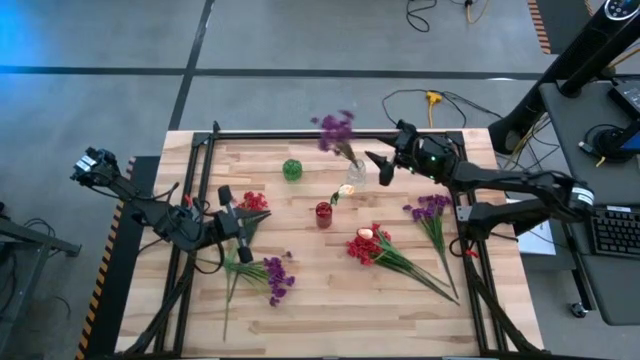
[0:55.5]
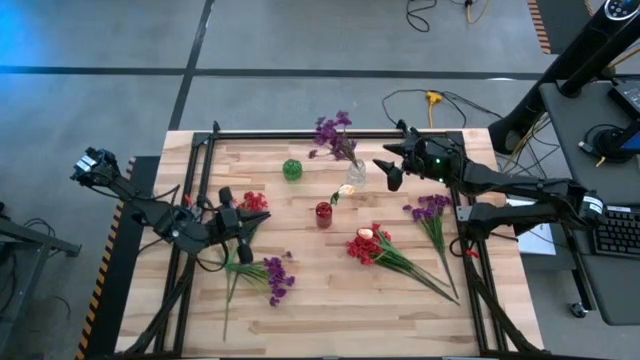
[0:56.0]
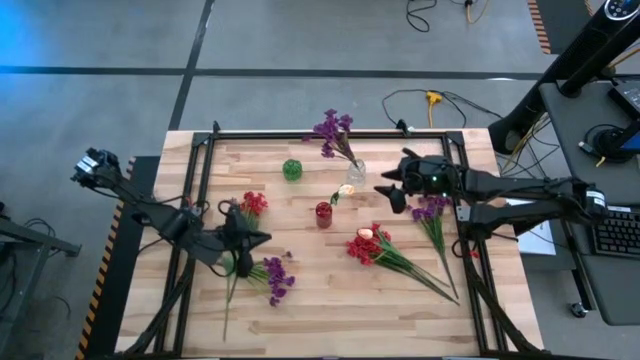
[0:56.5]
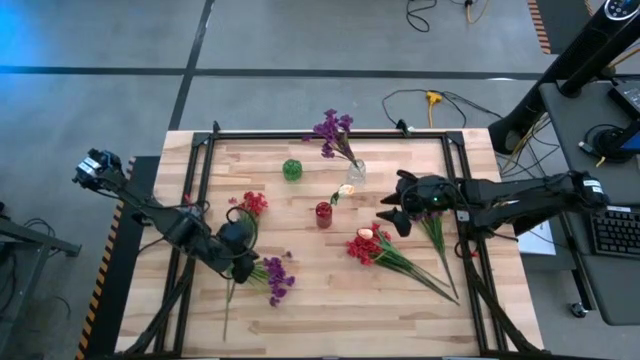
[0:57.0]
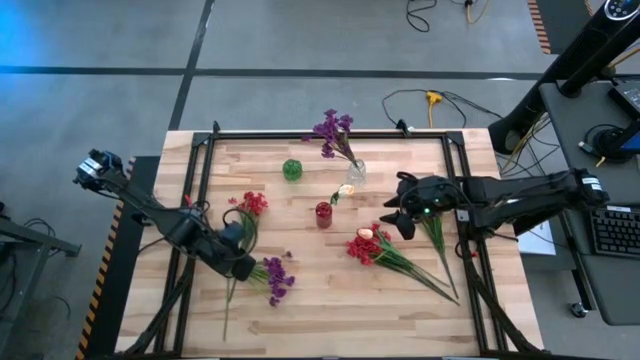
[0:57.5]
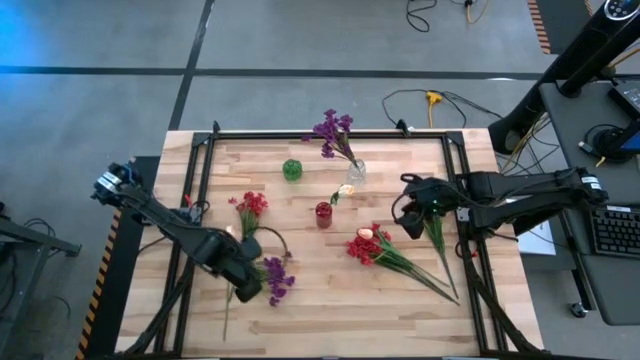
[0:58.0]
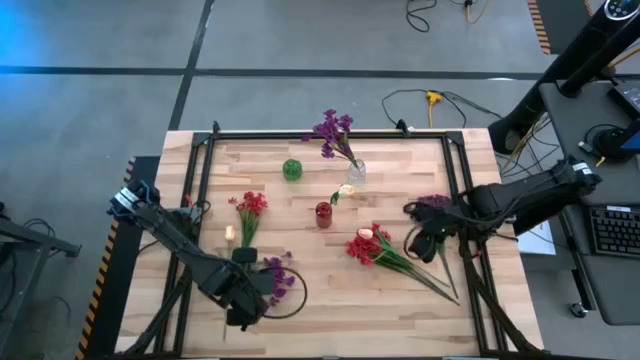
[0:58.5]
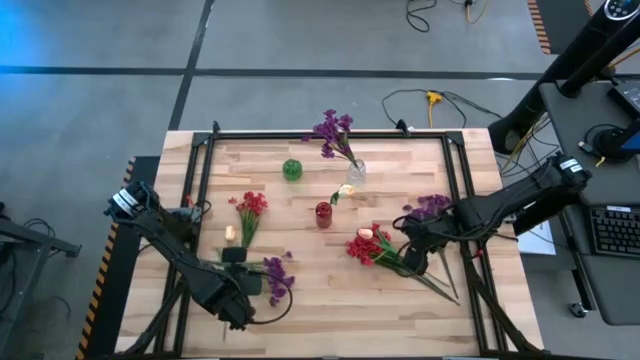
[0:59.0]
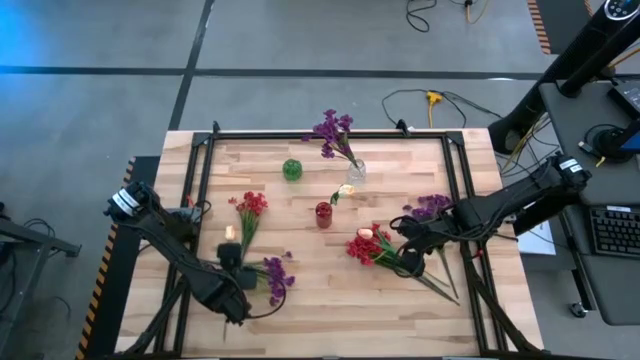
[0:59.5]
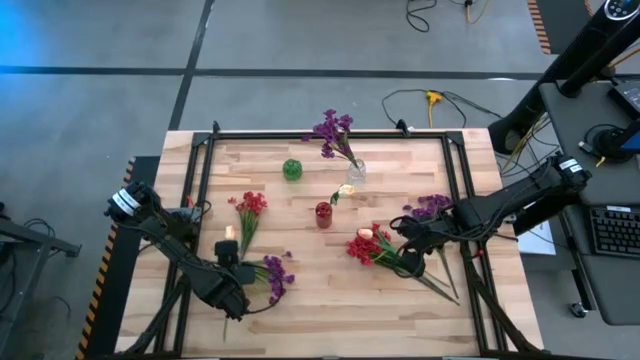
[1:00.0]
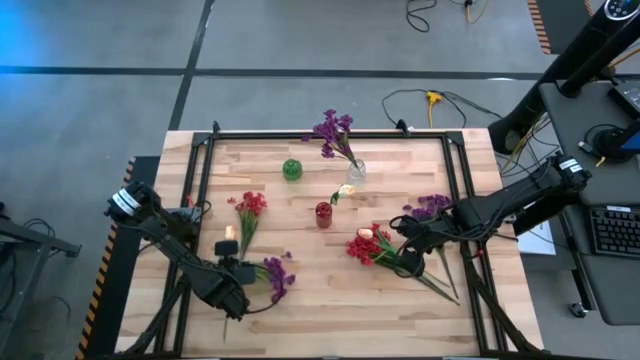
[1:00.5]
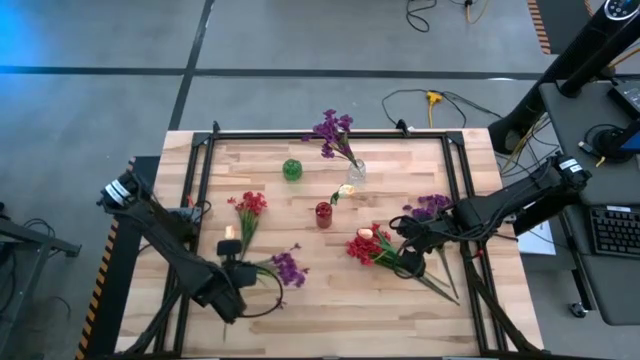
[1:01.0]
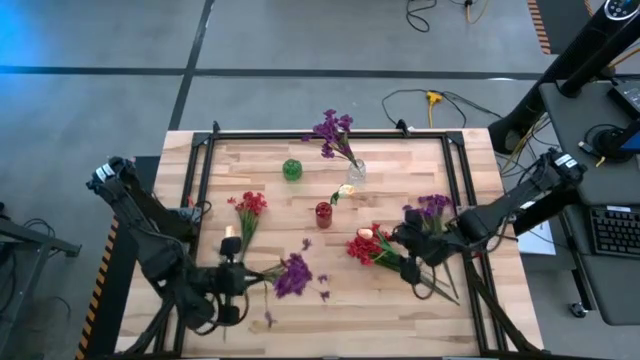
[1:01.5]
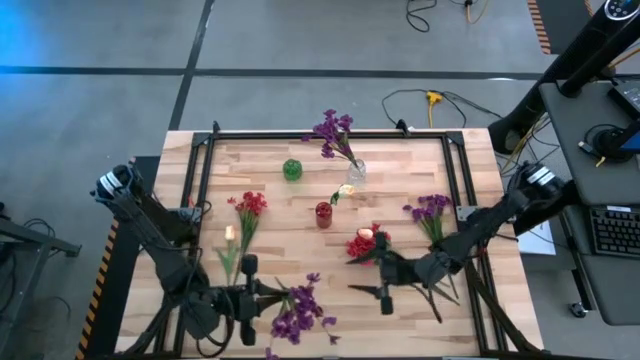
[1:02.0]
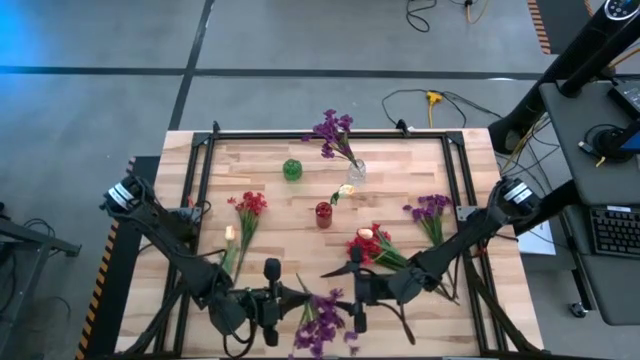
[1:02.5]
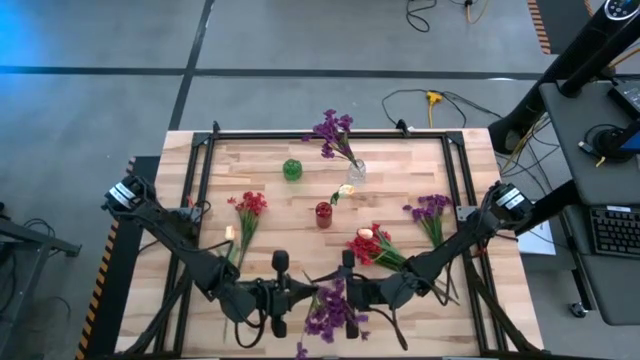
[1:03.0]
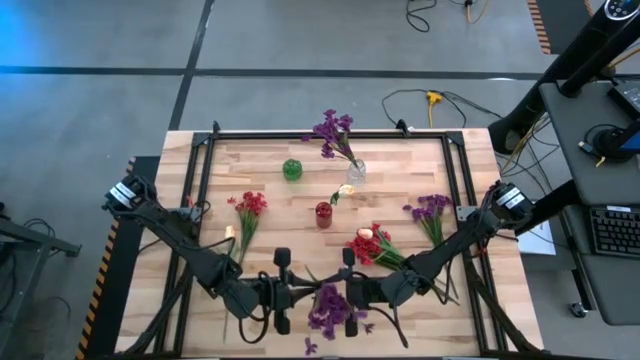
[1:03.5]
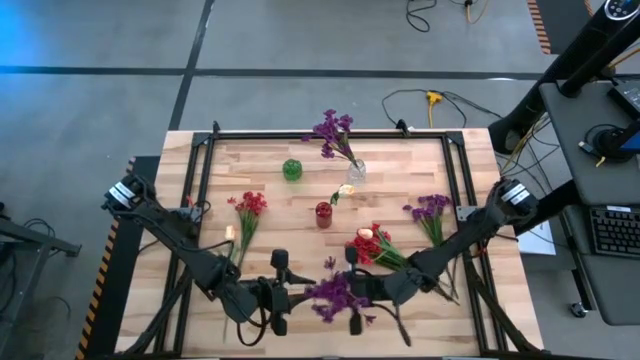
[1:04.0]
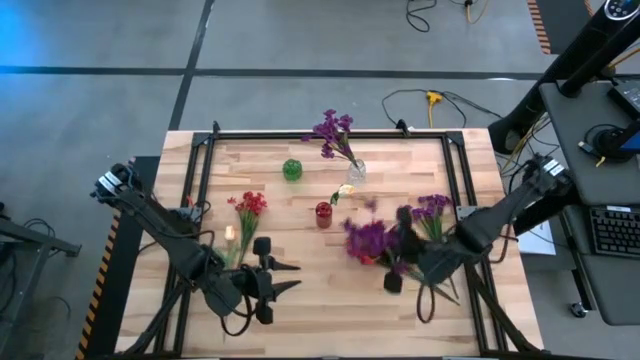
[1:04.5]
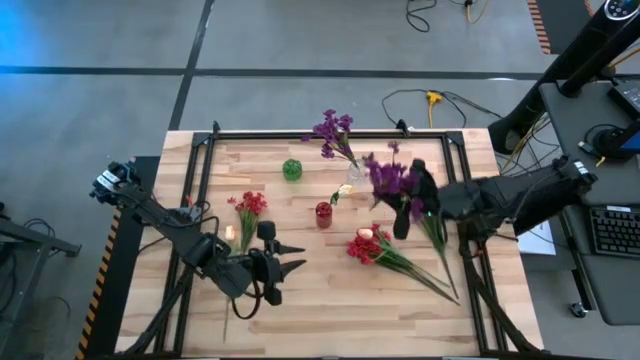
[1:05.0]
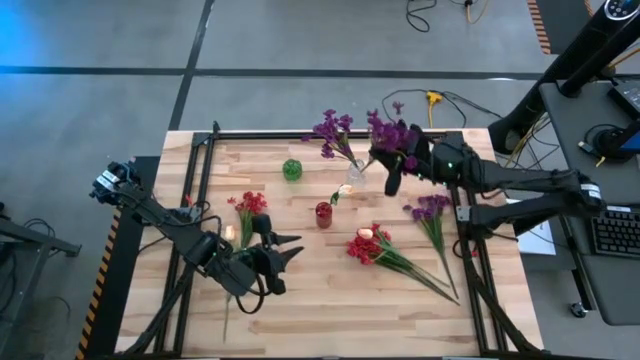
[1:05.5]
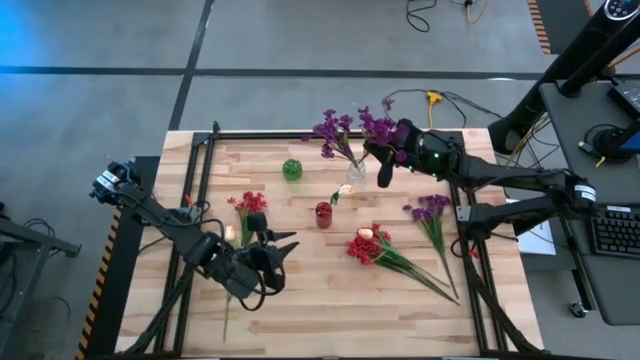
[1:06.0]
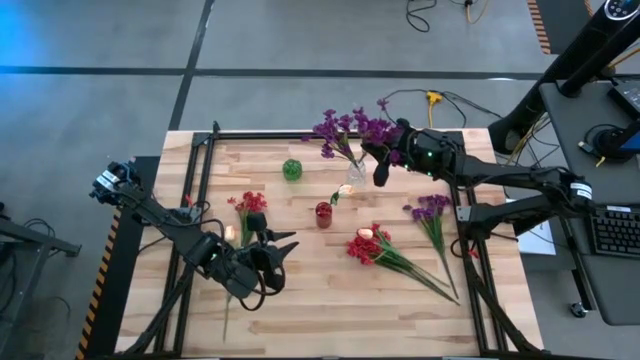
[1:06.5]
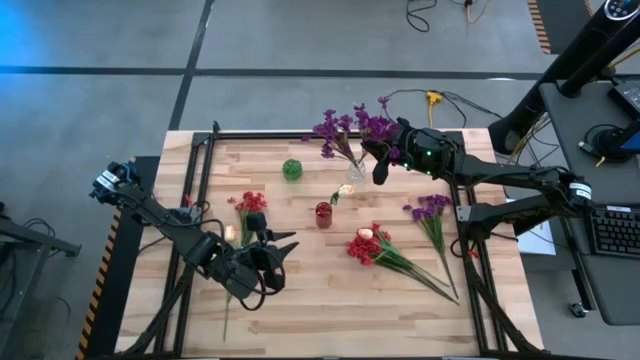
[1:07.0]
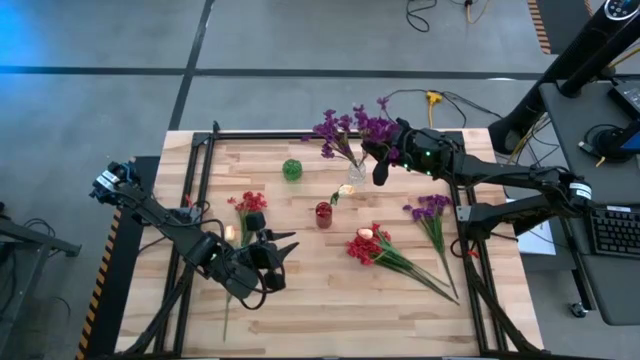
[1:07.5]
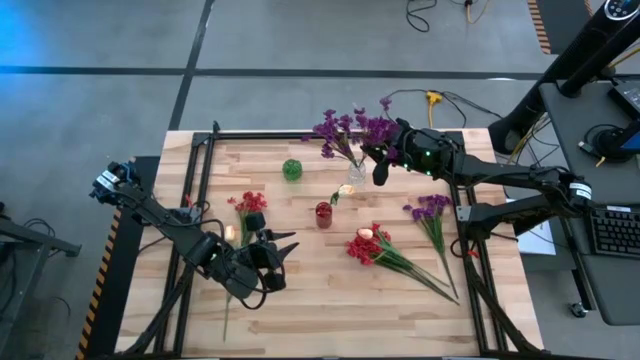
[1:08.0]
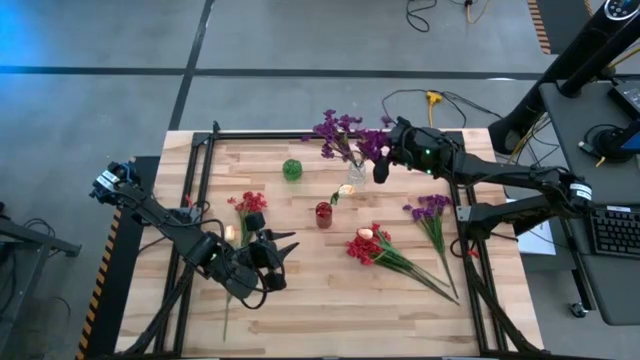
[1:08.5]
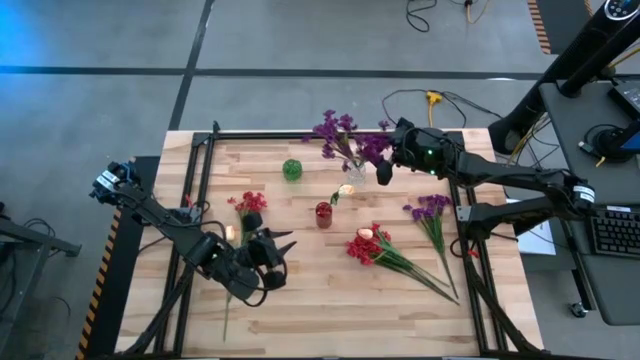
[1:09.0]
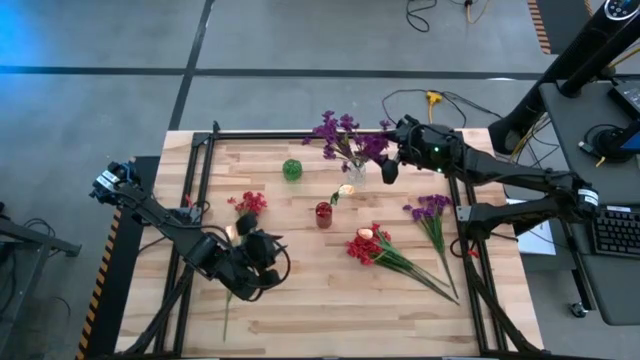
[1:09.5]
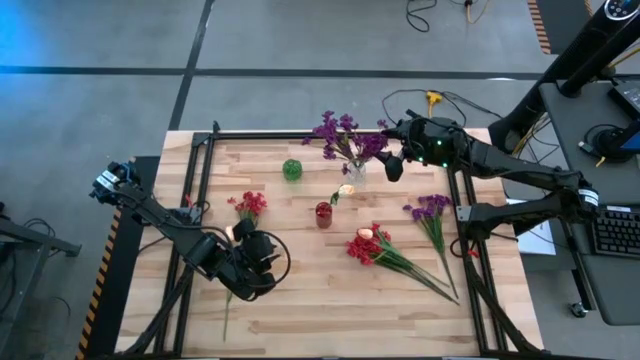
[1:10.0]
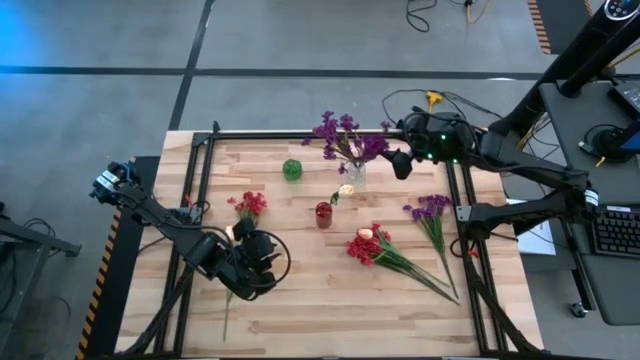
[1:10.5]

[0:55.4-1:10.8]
Task: Sort flowers into vase by color
Put the purple flowers into the transparent vase

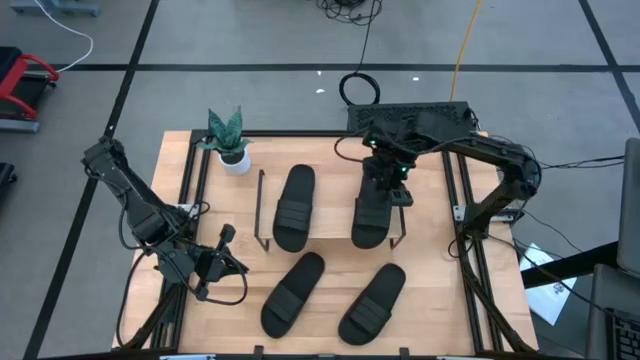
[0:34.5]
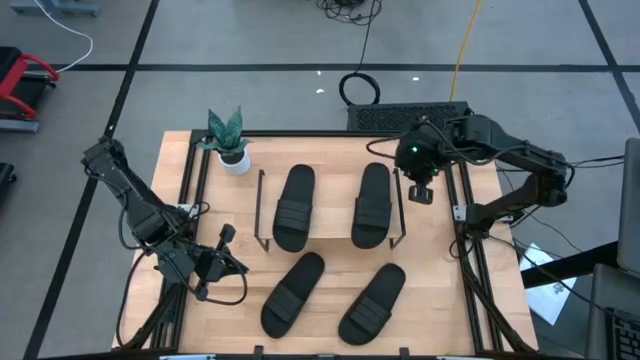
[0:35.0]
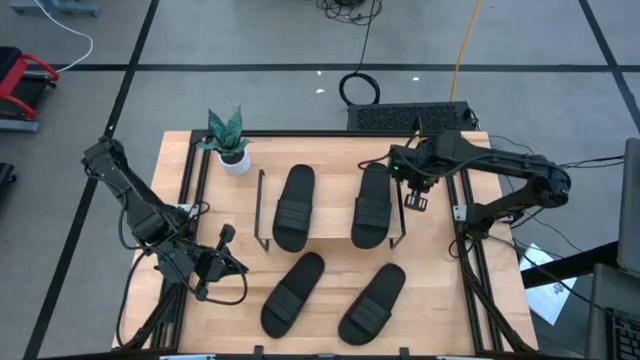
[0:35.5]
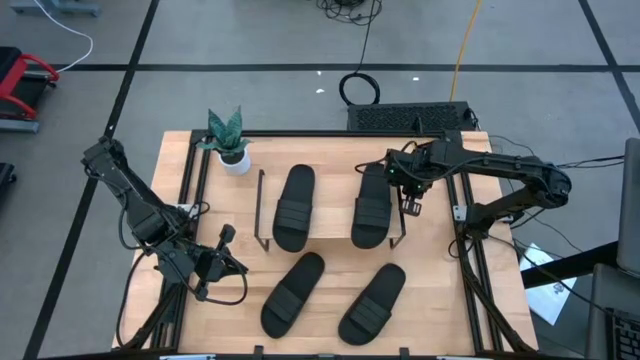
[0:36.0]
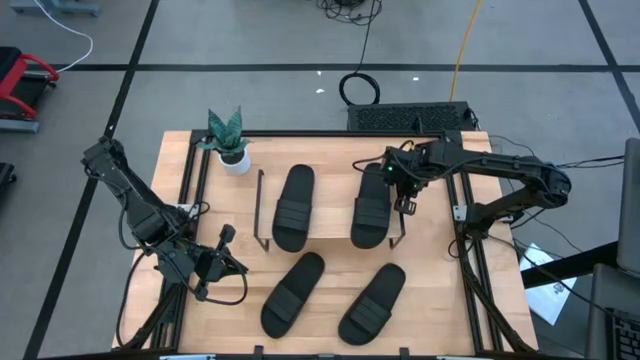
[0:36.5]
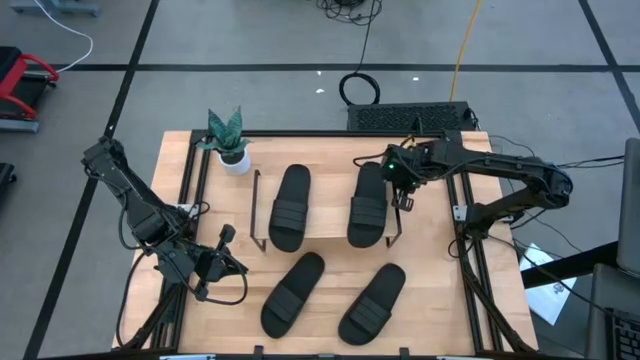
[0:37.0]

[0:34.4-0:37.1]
Task: Pick and place slides into the shelf
Adjust the shelf
